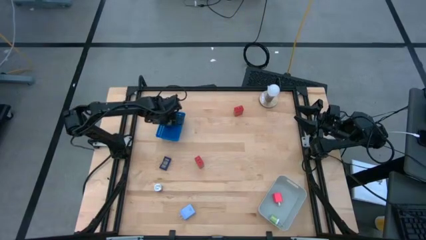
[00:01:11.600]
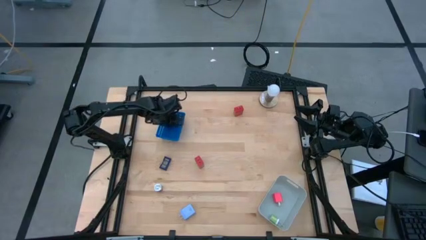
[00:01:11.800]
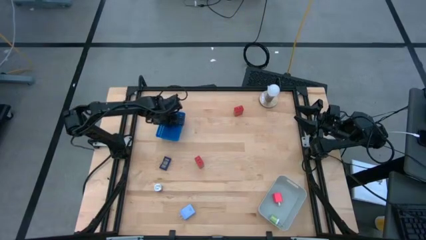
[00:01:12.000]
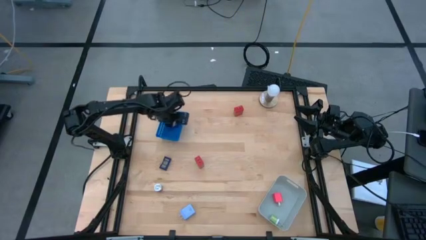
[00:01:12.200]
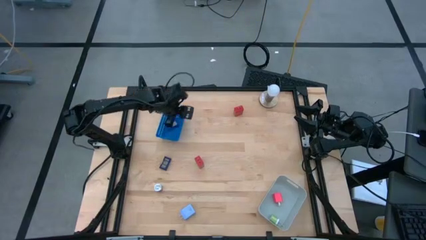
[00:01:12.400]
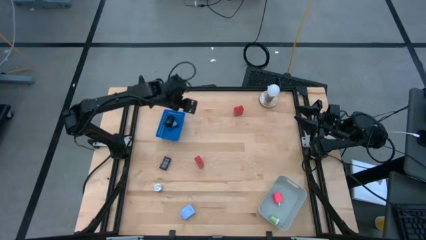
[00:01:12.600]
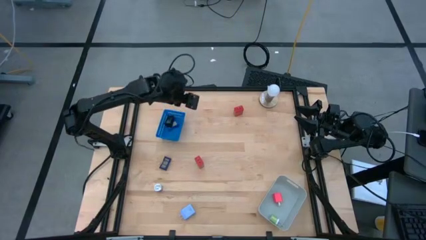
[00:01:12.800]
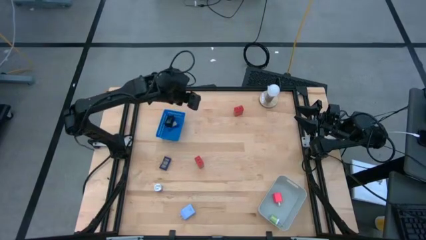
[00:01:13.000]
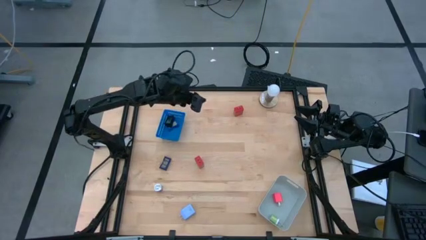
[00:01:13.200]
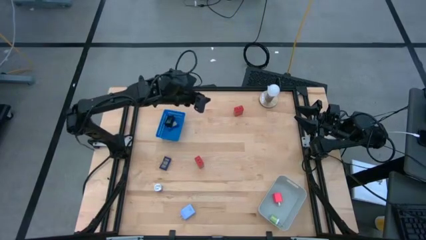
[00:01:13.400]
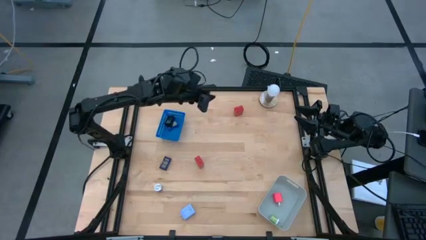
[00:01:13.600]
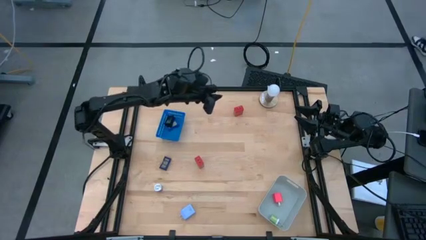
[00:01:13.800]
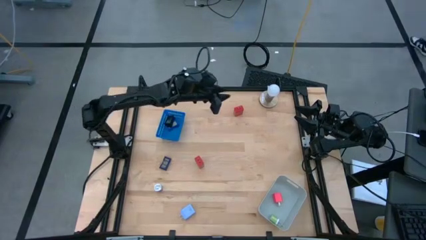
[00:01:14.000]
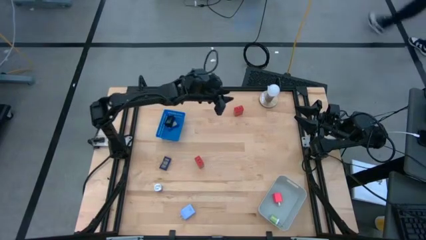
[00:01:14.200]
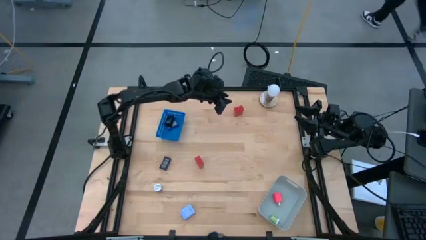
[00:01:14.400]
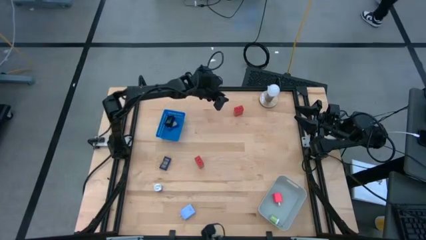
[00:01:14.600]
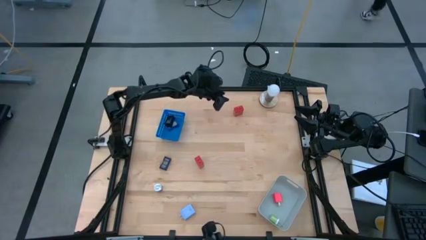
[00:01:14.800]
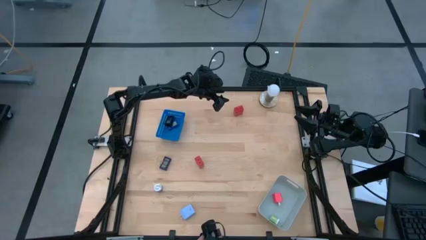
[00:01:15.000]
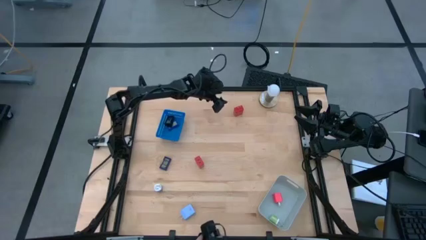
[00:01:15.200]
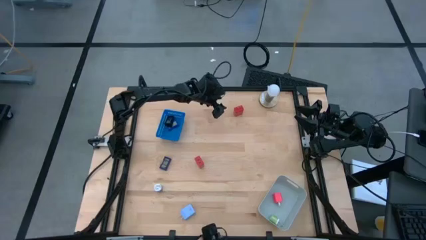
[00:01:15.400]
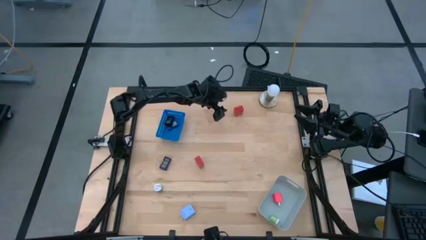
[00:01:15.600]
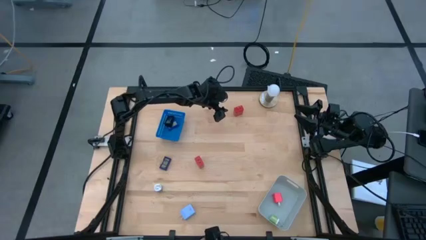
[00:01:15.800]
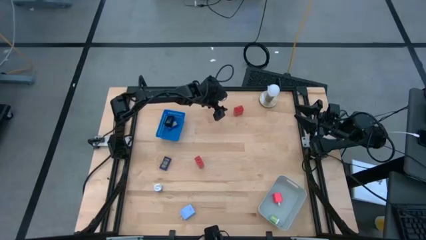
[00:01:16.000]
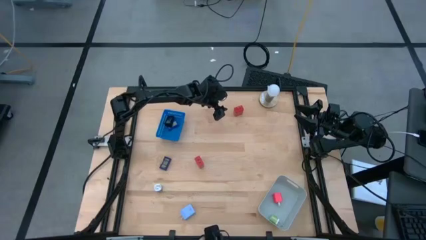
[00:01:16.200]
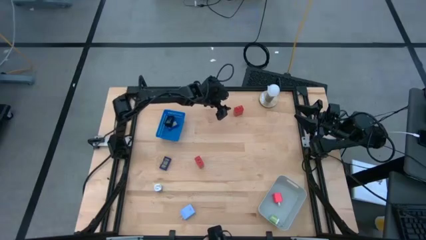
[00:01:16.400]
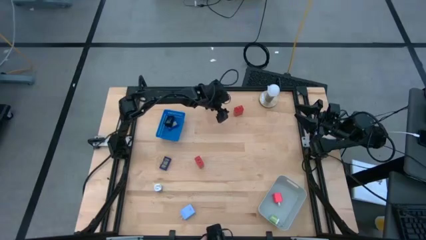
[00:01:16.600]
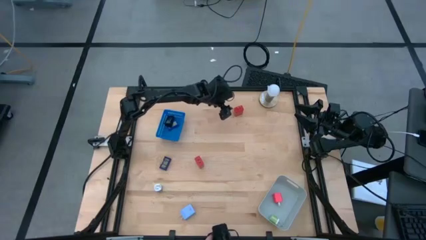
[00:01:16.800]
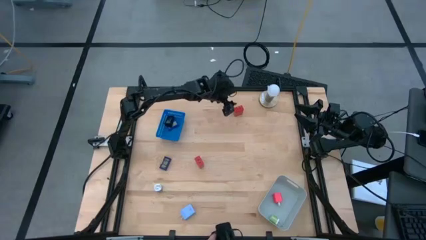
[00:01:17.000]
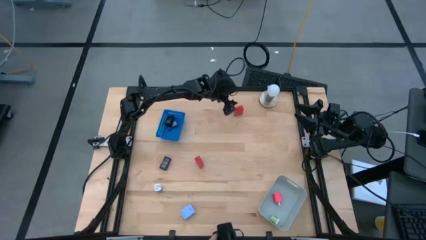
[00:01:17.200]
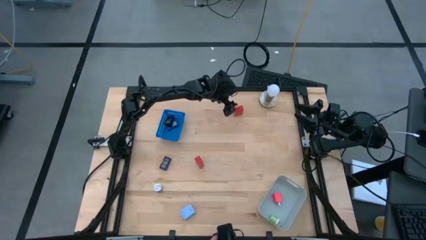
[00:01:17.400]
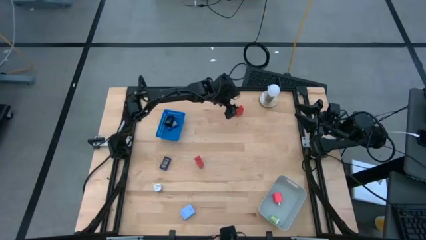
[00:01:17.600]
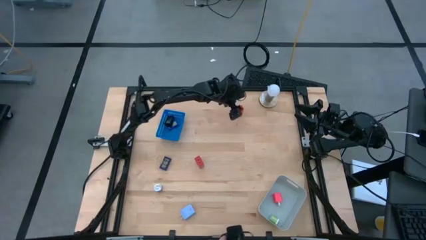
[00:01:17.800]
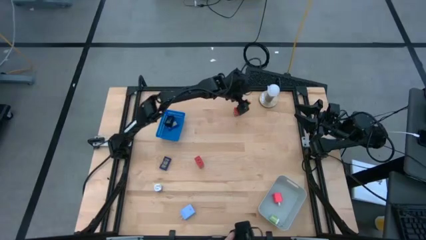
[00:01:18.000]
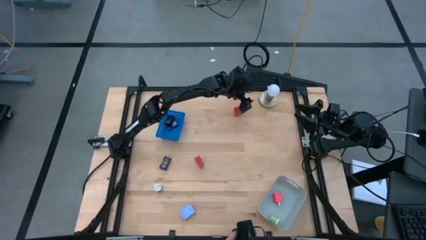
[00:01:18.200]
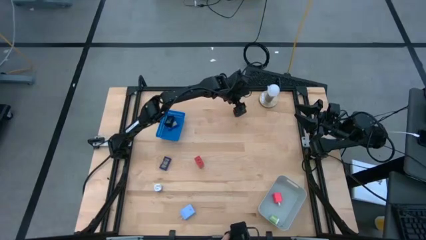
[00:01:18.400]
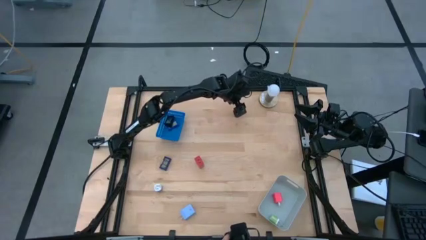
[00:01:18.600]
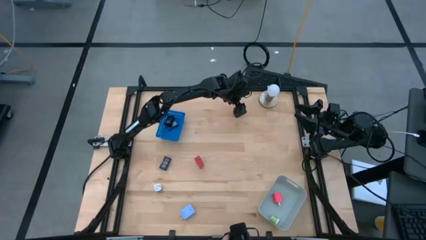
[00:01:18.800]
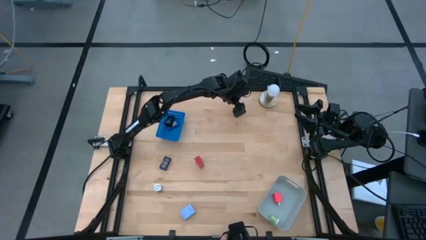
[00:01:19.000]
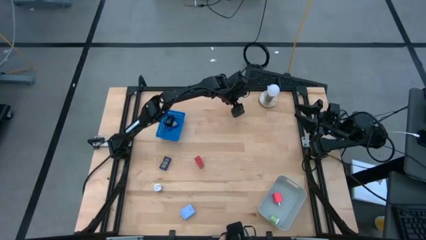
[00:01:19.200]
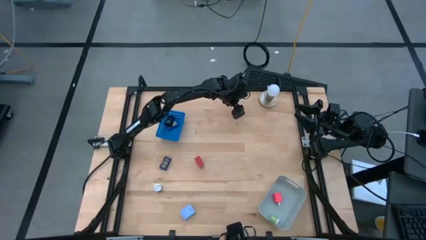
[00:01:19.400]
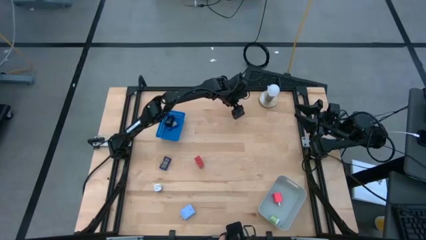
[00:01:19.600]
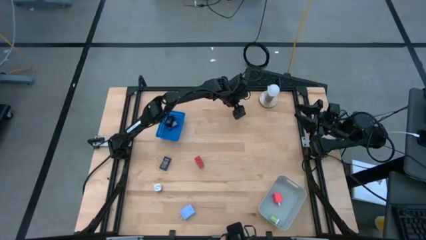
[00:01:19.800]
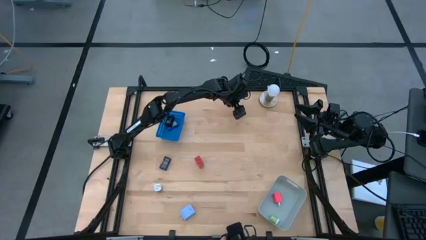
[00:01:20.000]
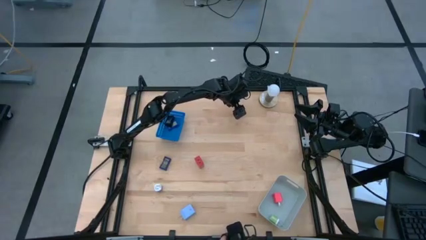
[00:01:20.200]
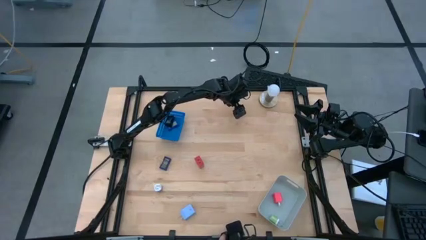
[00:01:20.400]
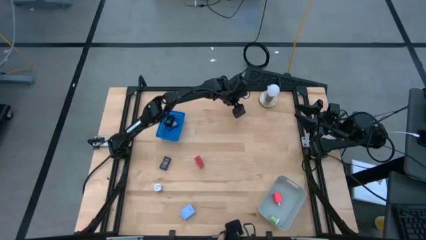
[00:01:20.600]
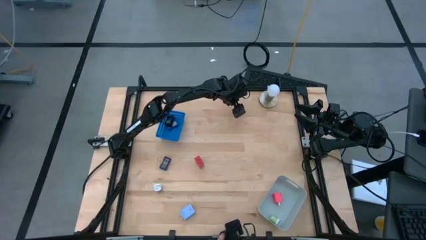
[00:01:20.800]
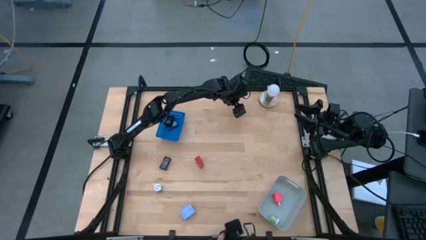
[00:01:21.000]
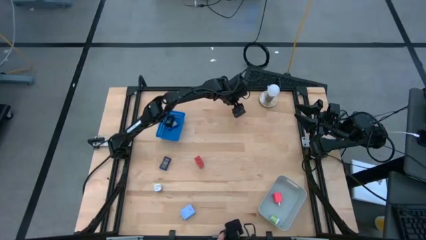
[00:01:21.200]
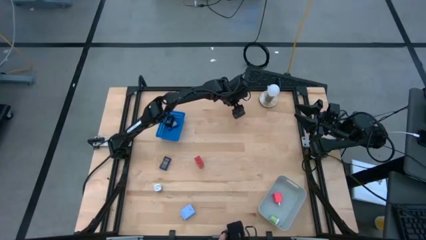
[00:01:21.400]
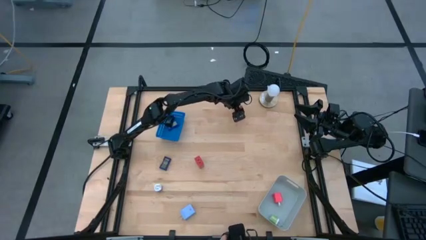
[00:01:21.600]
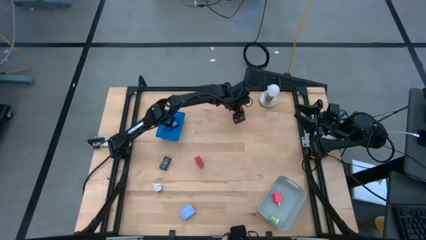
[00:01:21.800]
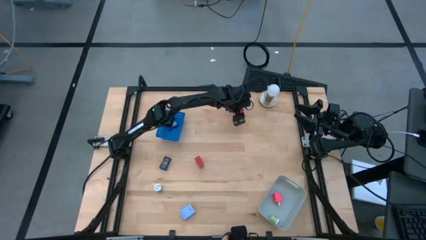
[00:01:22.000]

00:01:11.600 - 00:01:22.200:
Task: Pick & Place Office items
Put the top red charger adapter into the white bin

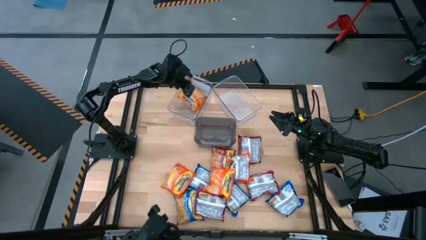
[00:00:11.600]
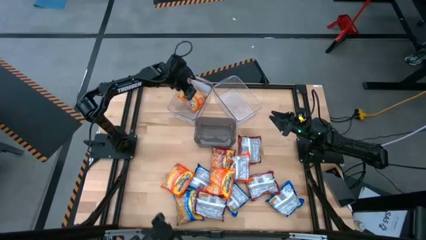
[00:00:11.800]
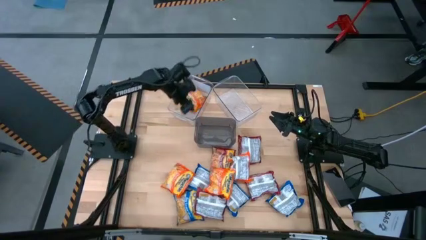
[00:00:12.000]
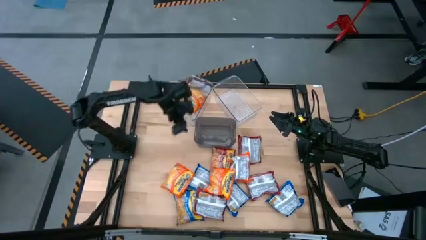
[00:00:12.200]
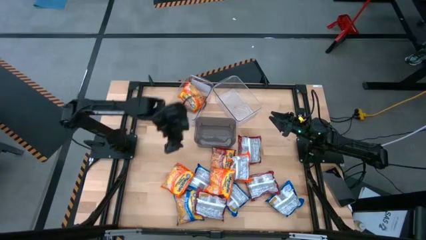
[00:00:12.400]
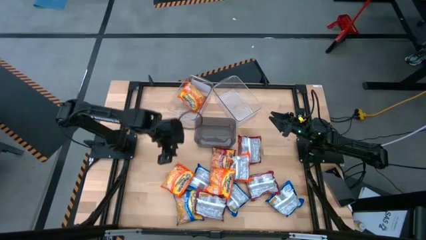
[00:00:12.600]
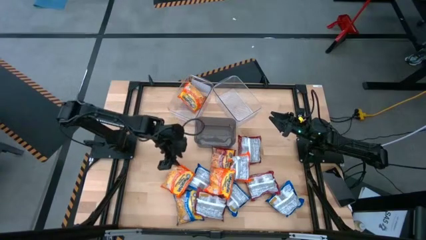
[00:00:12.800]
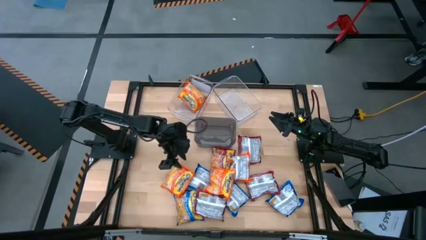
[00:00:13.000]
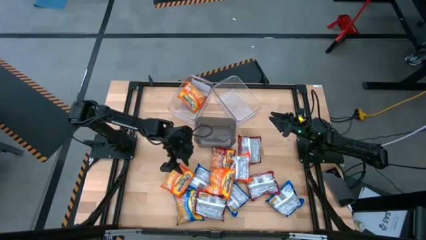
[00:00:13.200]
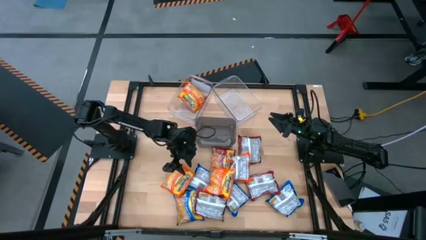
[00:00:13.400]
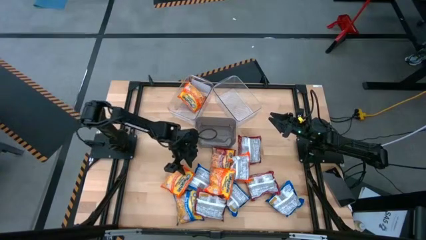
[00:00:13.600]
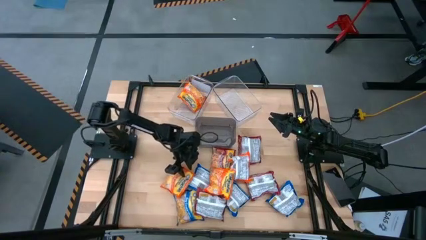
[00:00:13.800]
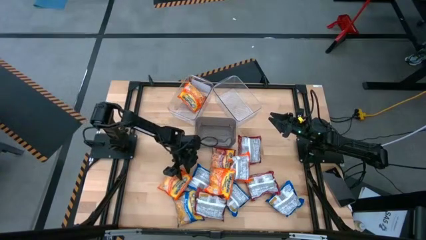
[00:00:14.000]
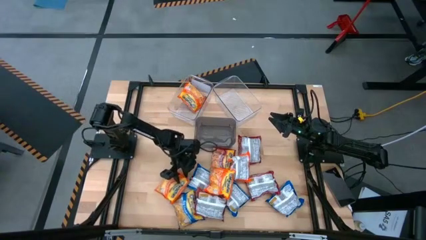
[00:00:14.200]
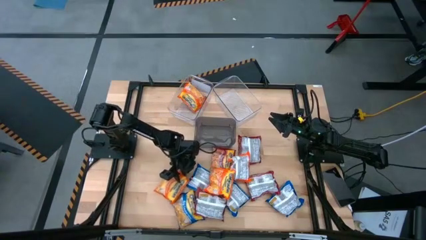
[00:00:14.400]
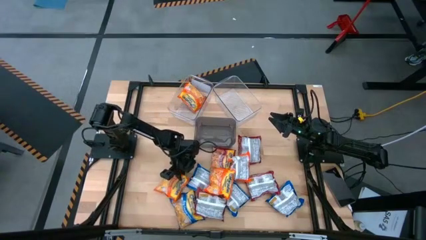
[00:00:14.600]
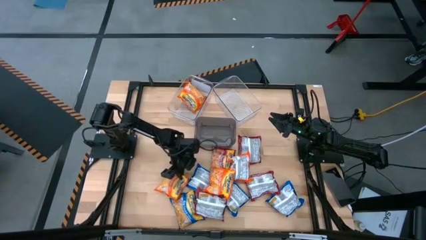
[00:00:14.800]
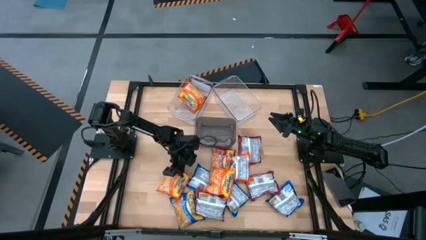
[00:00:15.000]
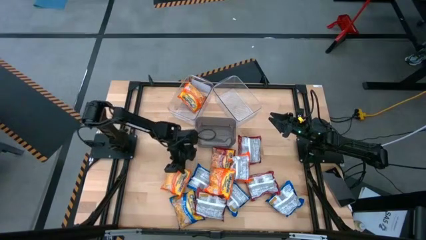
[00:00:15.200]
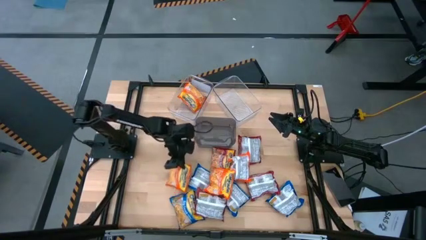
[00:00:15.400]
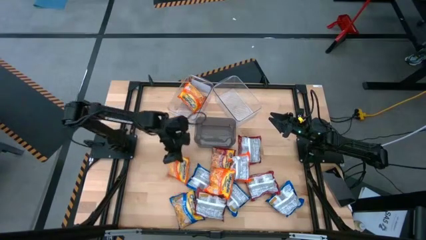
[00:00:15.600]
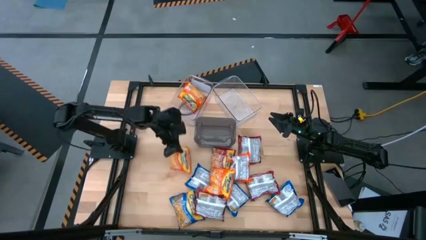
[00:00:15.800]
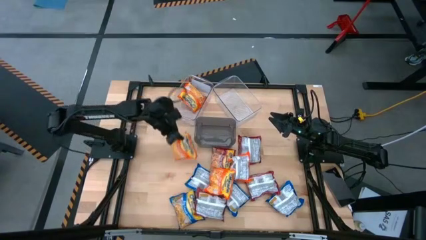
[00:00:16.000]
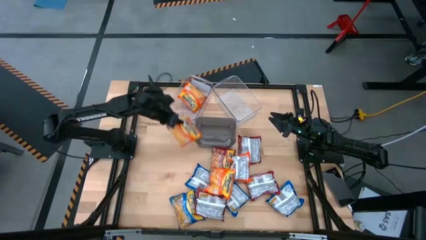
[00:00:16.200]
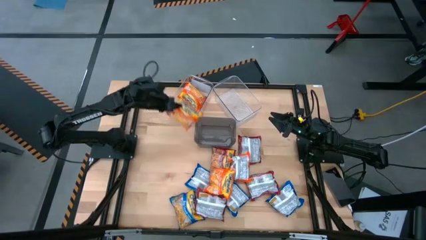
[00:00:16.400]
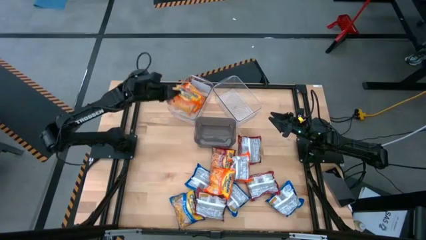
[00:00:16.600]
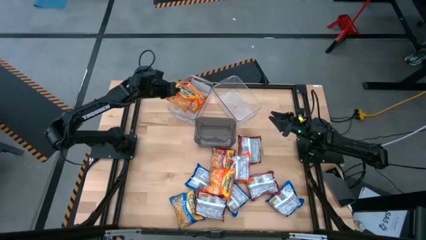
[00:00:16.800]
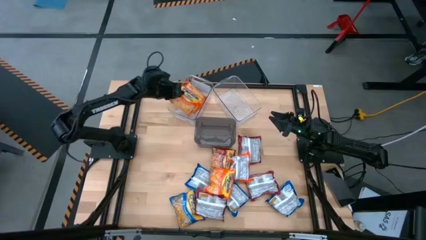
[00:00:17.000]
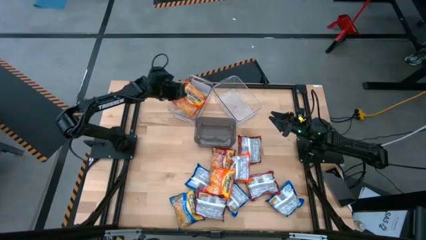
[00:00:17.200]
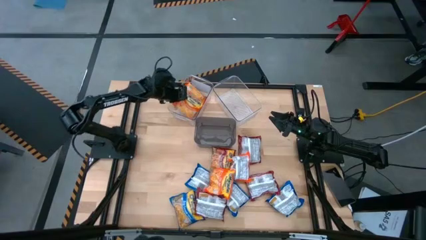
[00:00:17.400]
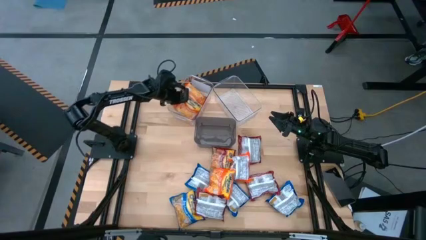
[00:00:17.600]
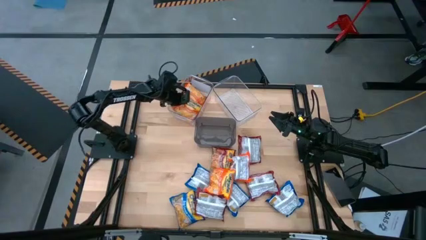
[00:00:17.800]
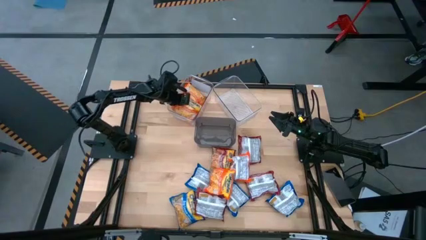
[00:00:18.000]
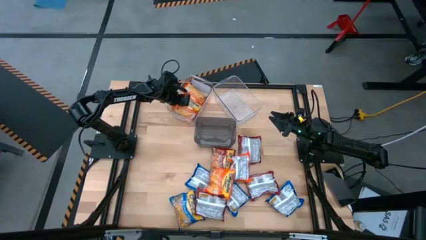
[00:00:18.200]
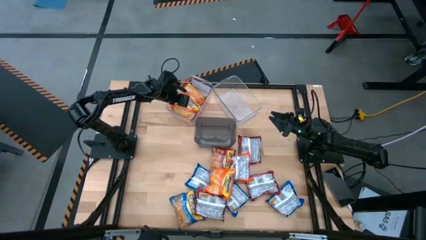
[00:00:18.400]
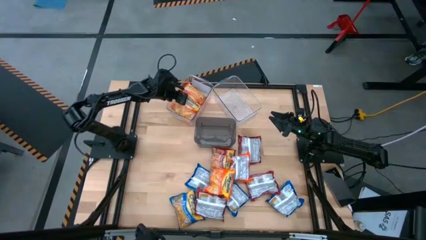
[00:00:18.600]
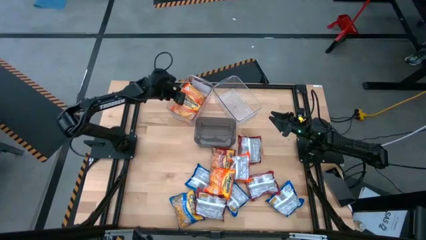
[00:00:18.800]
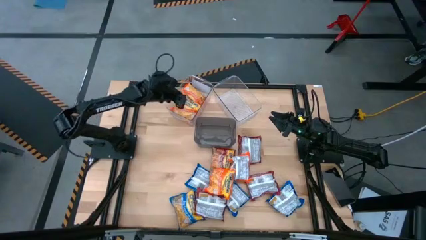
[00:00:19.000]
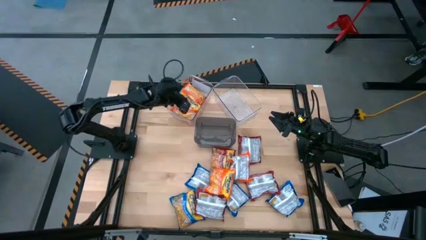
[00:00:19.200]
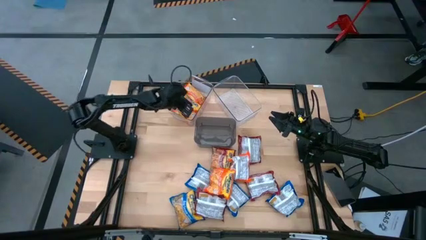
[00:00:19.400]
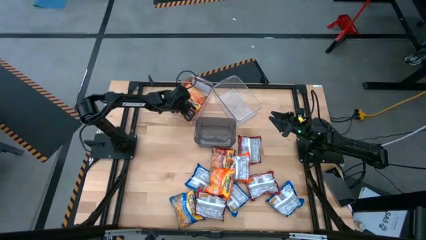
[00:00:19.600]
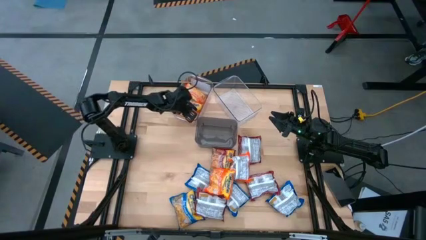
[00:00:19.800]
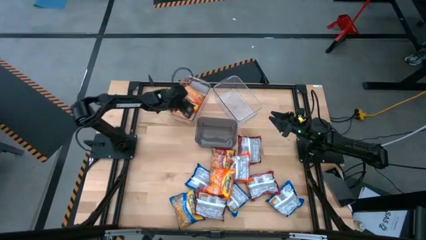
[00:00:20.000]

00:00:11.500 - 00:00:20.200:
Task: Sort Maruchan noodles
Put the orange noodle pack into the left transparent bin
